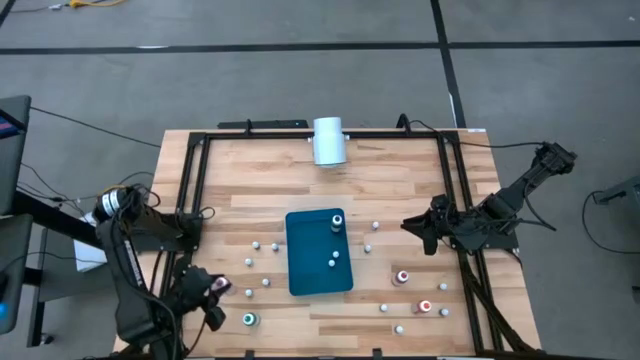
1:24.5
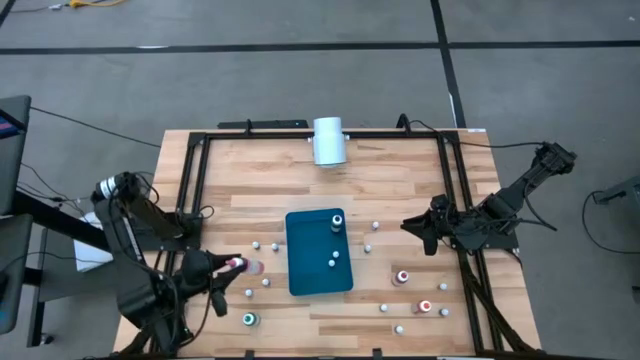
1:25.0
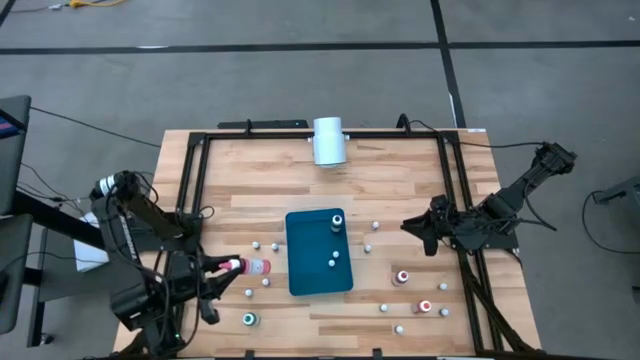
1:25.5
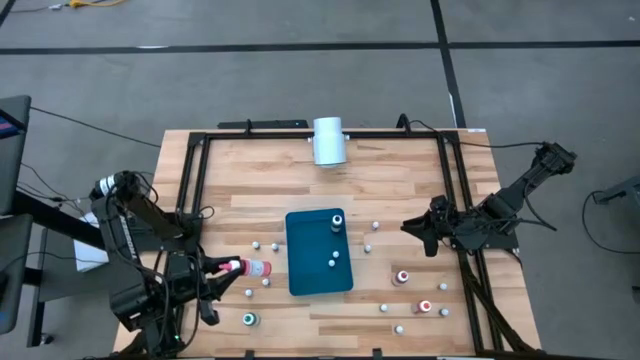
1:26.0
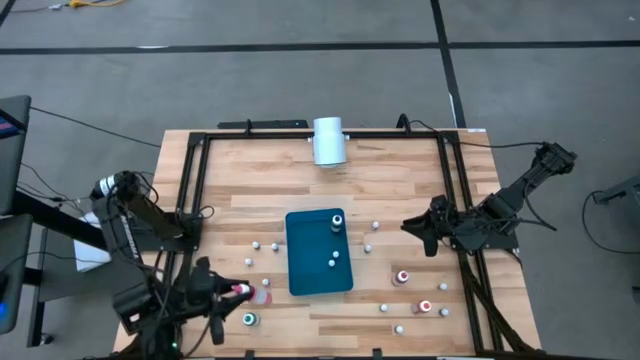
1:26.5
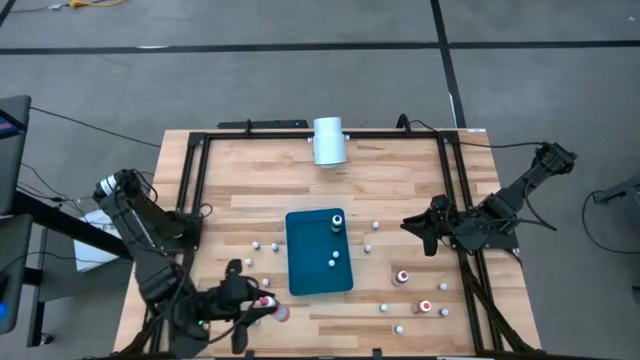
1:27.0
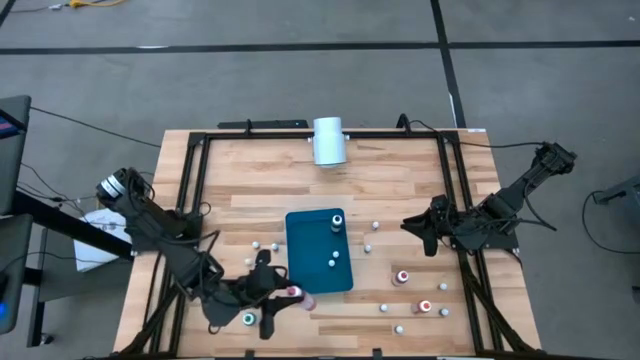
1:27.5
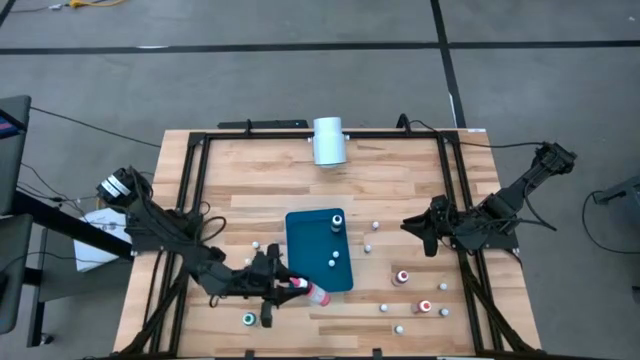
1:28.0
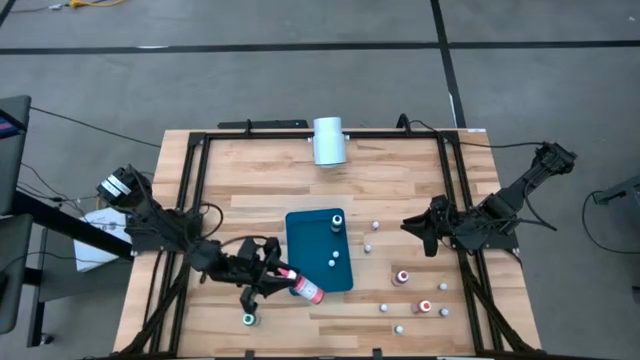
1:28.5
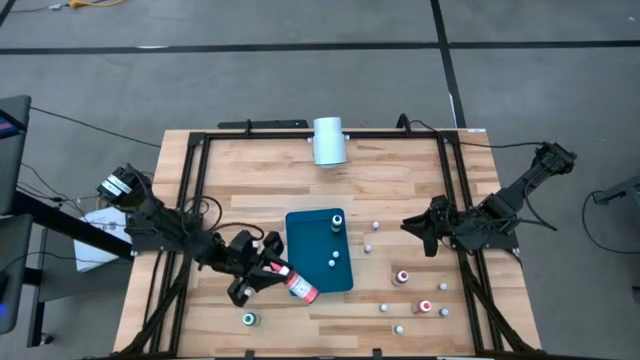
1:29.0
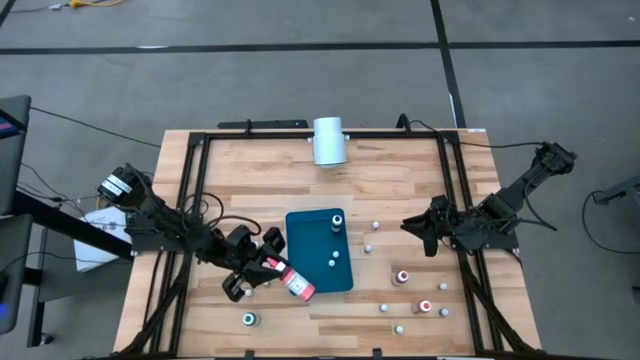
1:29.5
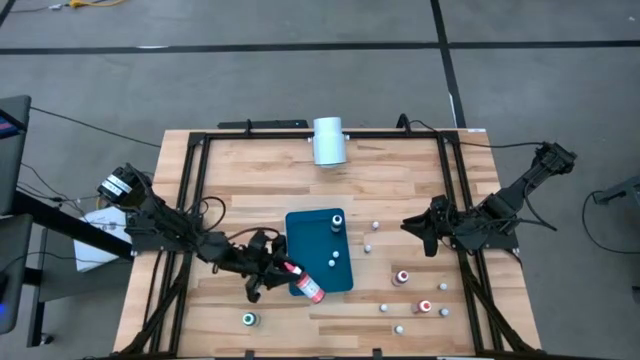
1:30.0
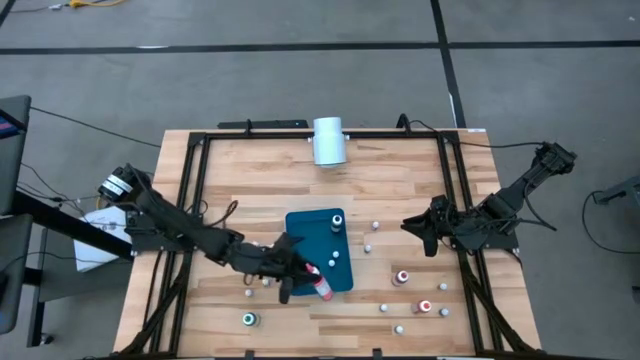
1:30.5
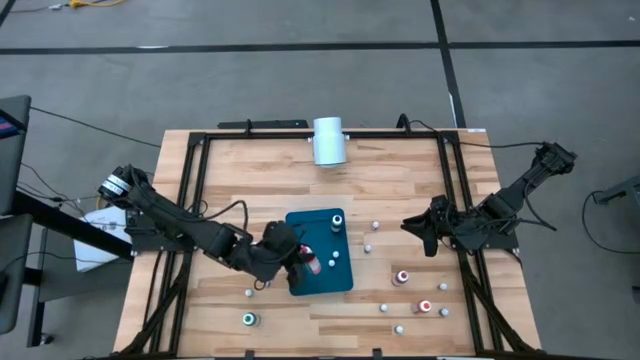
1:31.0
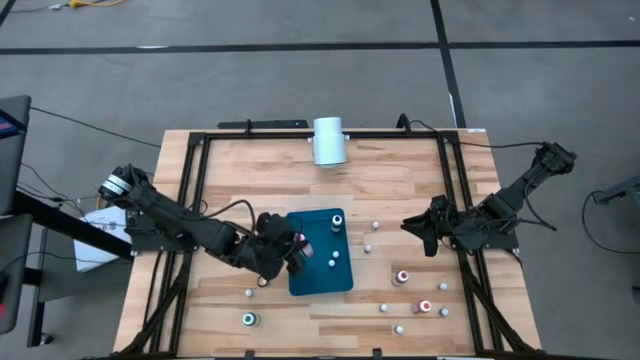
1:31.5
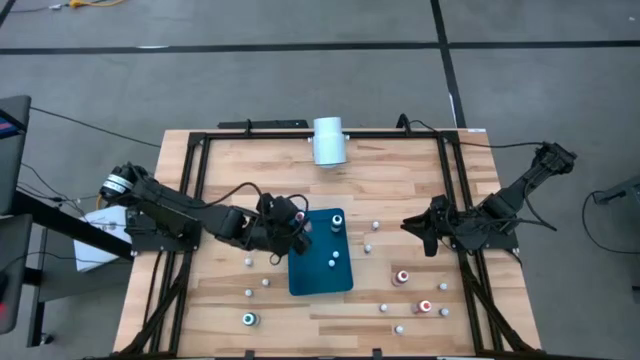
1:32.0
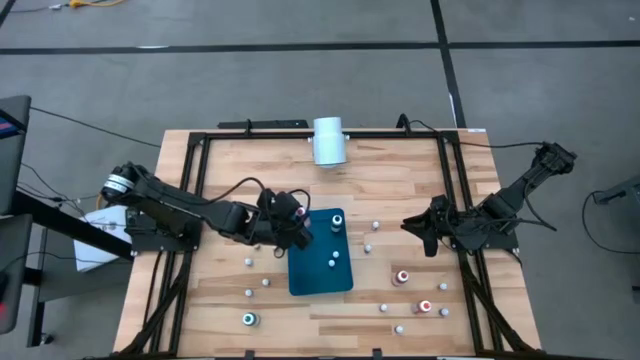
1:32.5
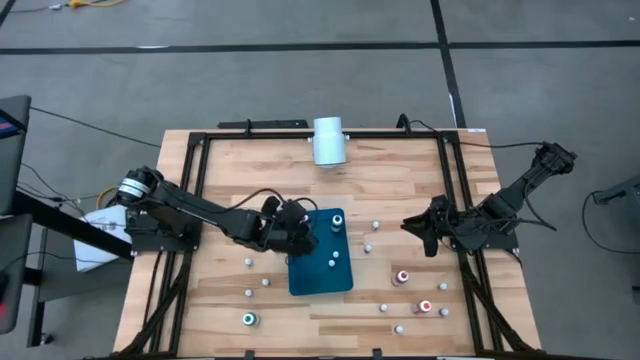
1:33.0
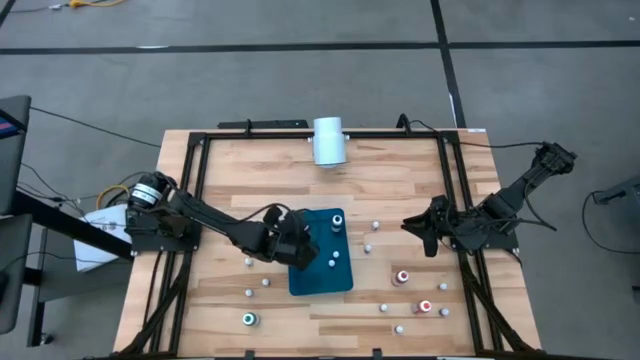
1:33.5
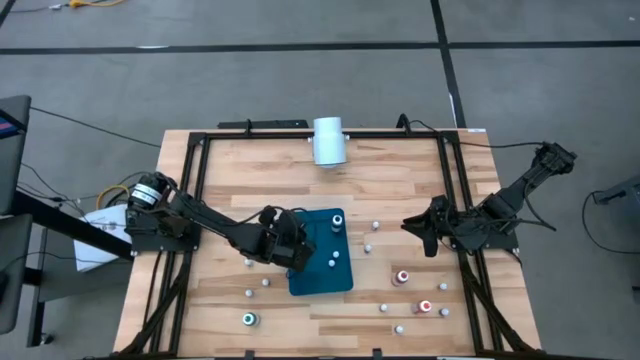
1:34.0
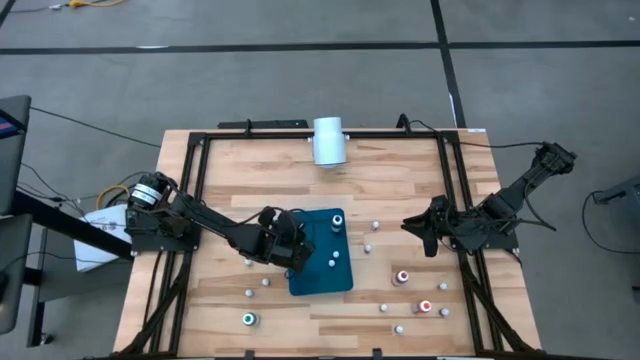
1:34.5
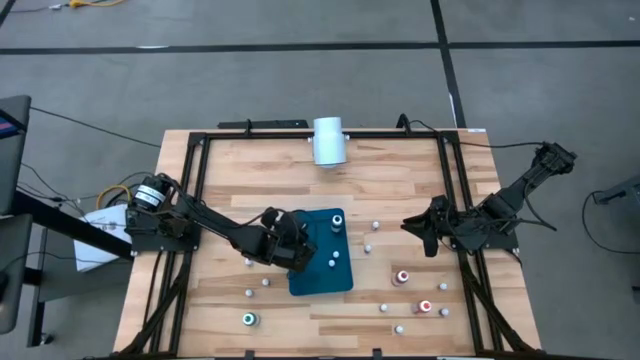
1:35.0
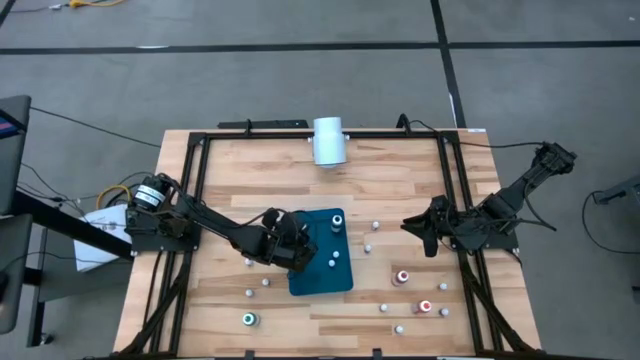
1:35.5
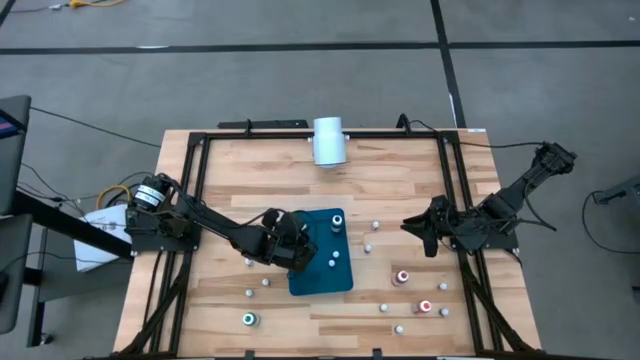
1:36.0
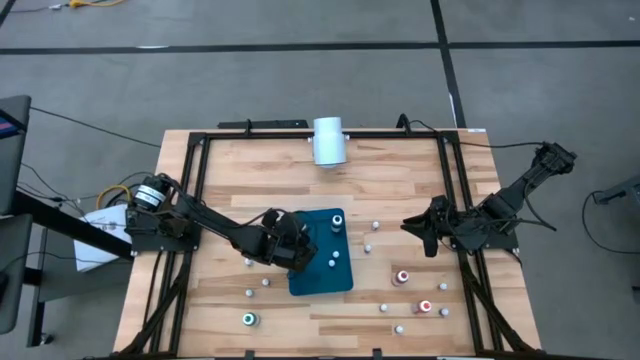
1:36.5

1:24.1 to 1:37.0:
Task: Pick & Place food coloring
Put the big pink food coloring bottle into the blue bin

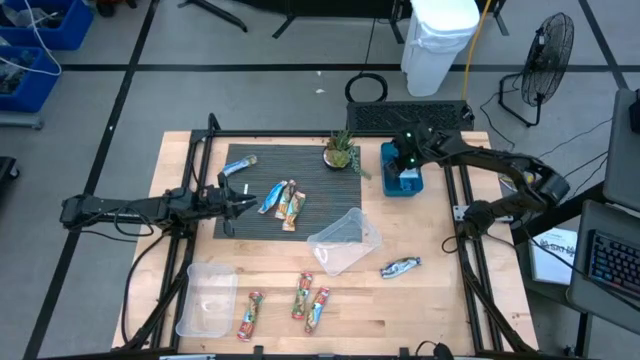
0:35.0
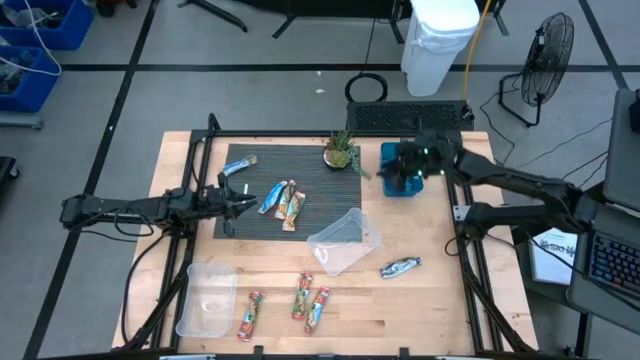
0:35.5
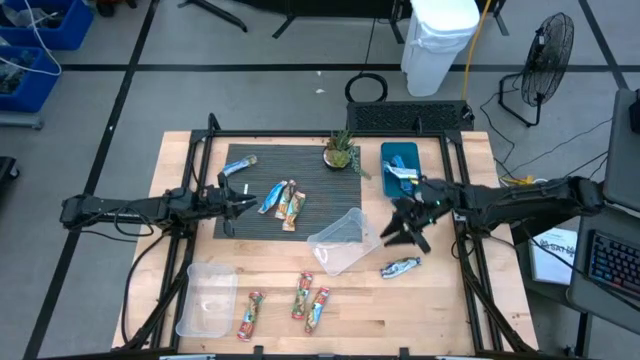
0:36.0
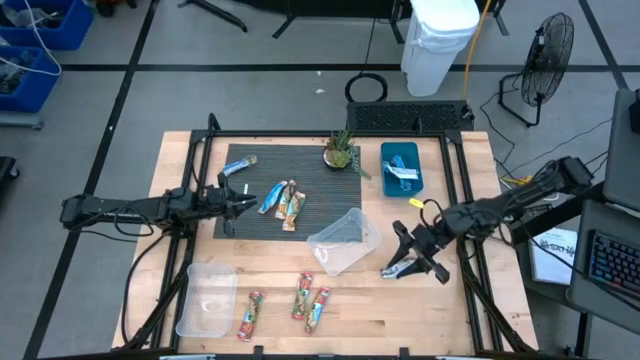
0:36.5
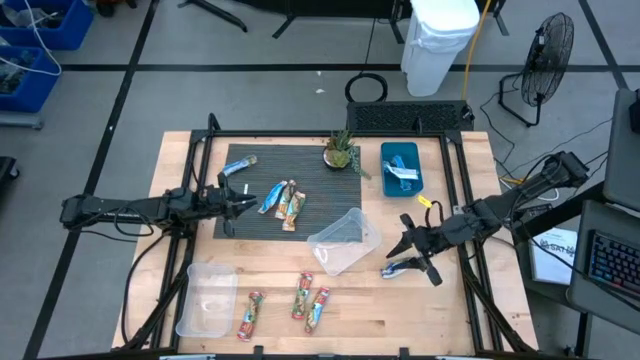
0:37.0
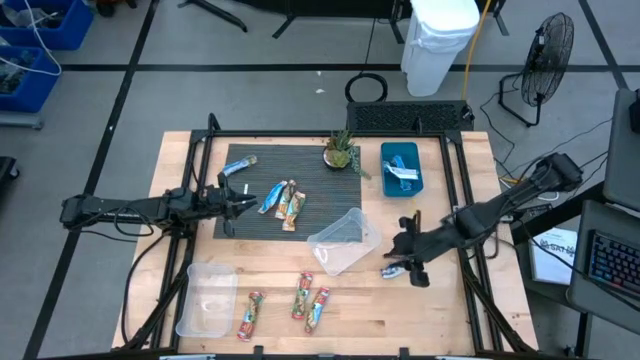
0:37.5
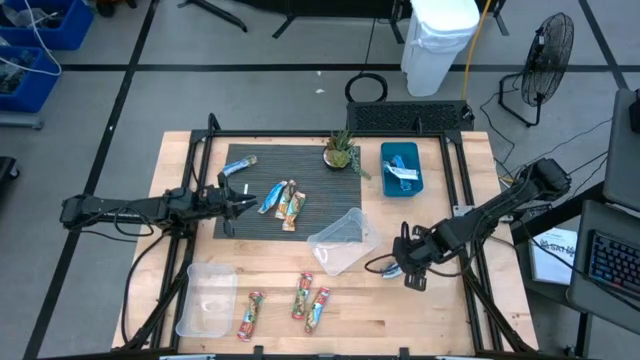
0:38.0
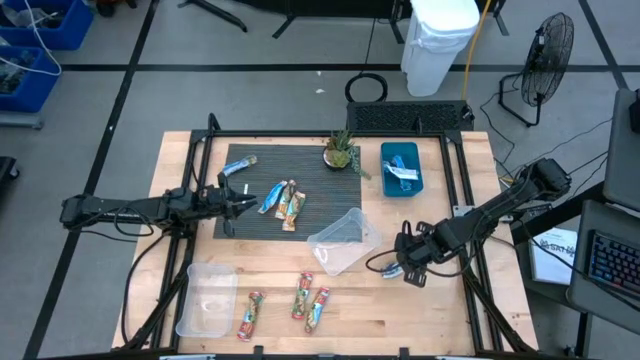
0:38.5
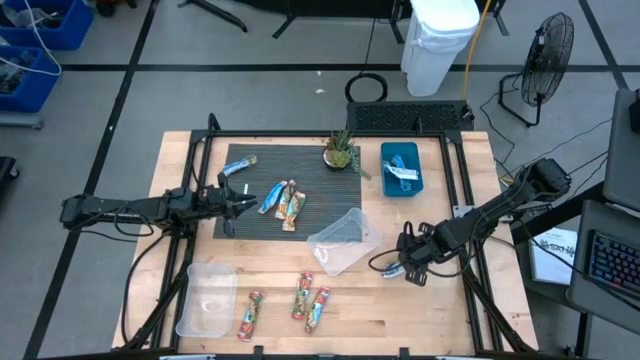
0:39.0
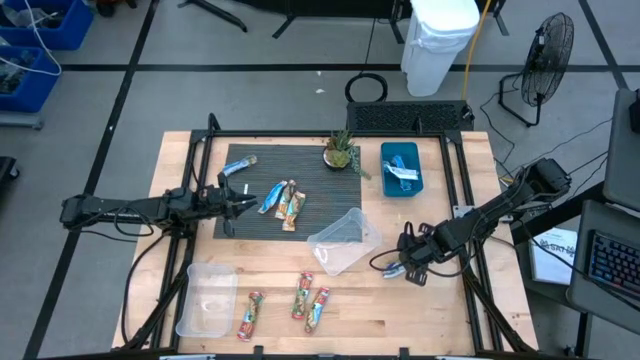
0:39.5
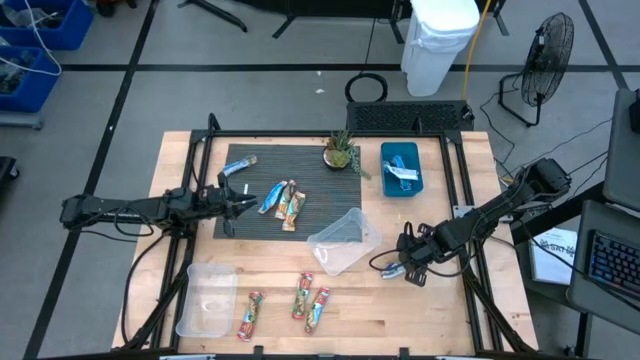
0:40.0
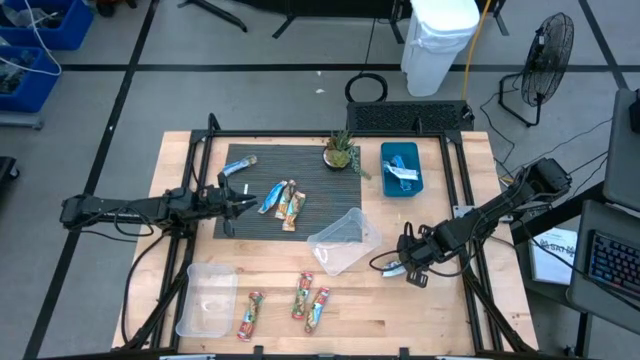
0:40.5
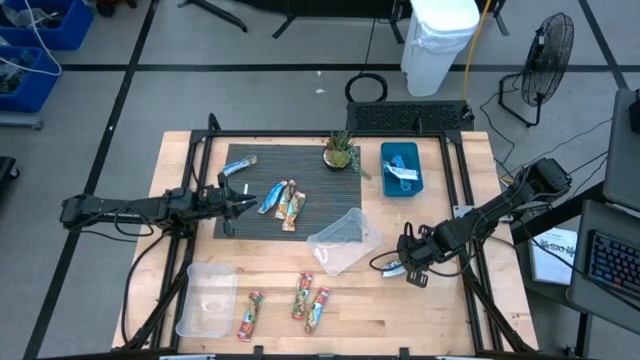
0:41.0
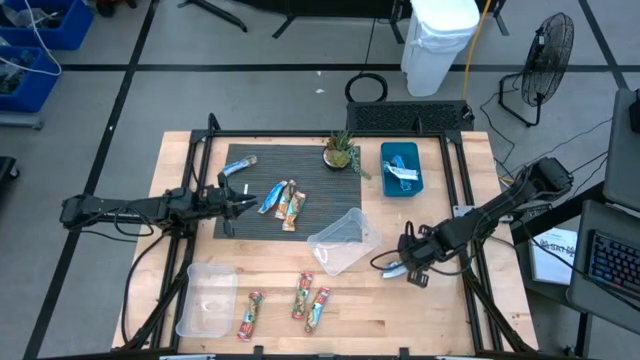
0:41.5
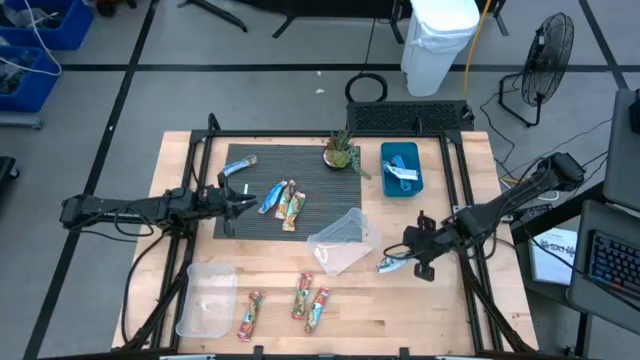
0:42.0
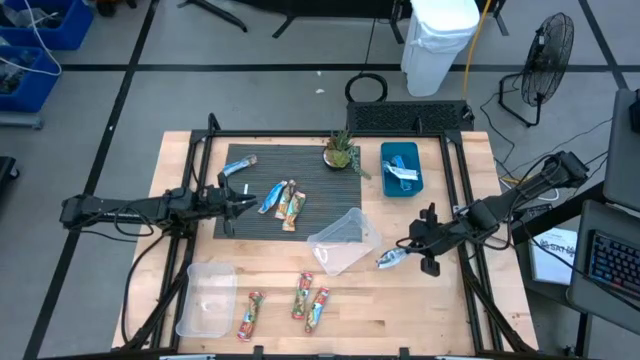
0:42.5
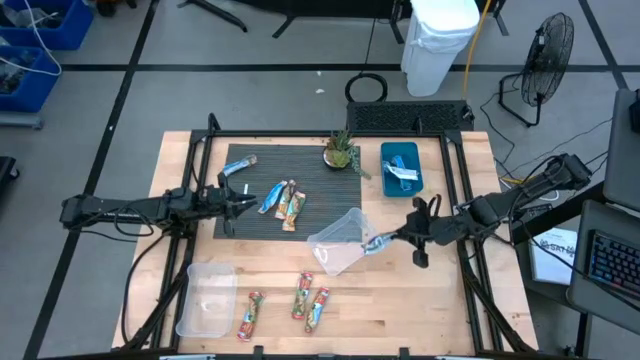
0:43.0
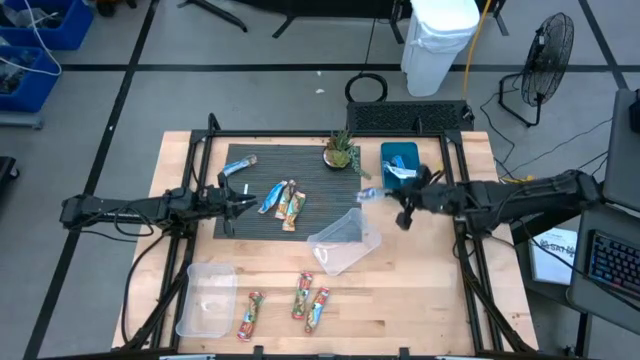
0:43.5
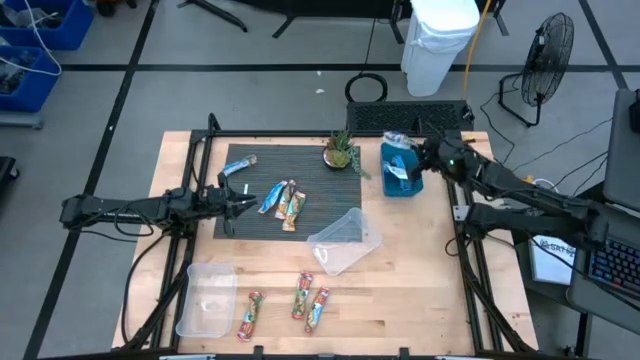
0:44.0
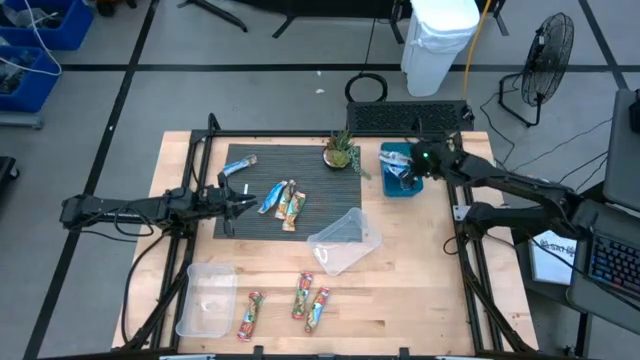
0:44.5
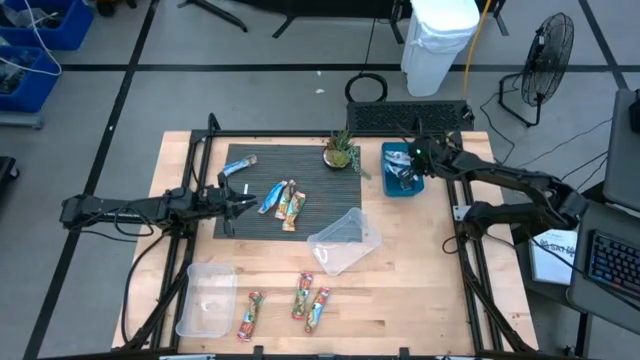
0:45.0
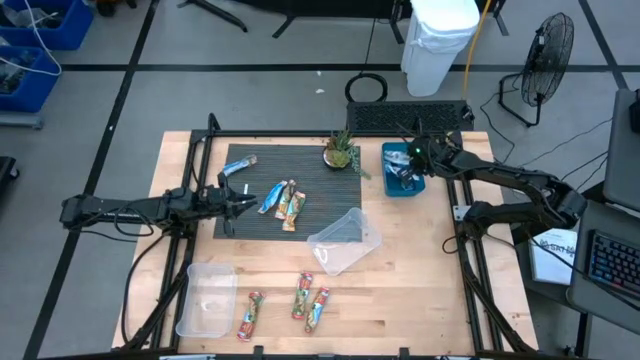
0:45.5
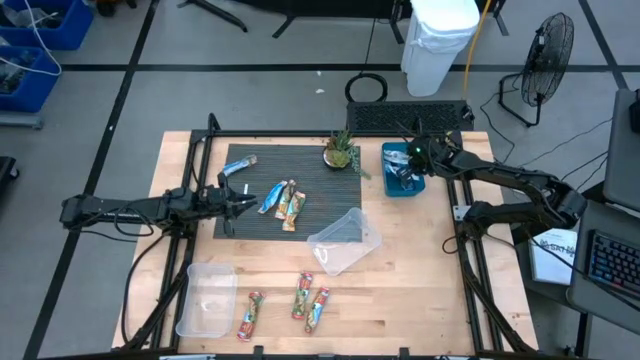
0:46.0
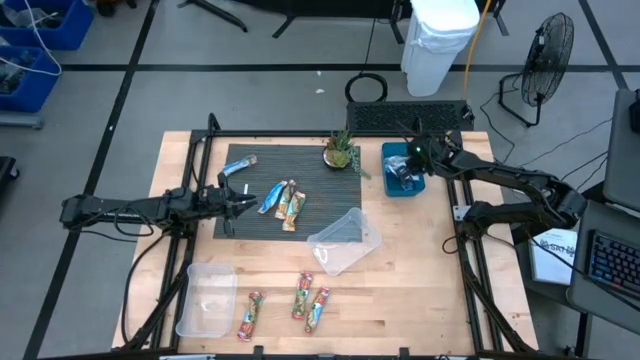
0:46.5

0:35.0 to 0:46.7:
Task: Pick and place Granola Bars by type
Put the blue granola bar into the blue bin
